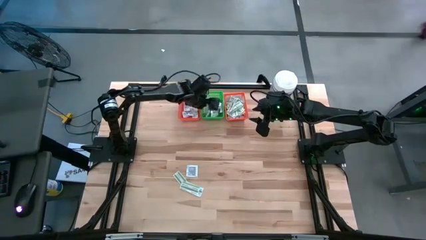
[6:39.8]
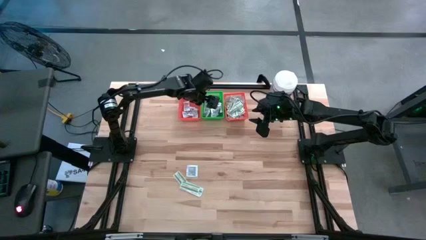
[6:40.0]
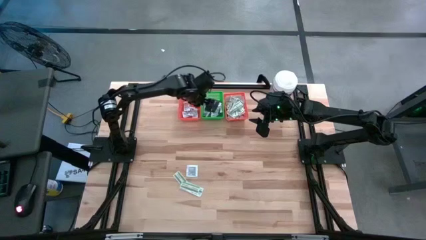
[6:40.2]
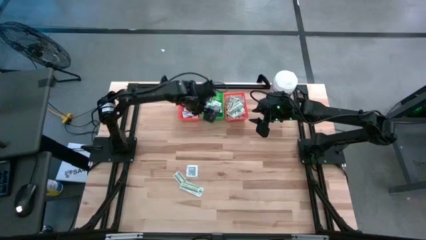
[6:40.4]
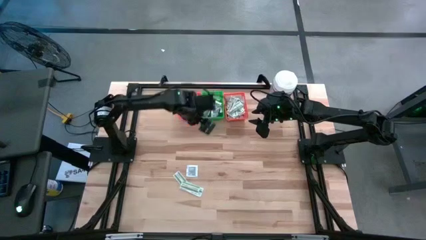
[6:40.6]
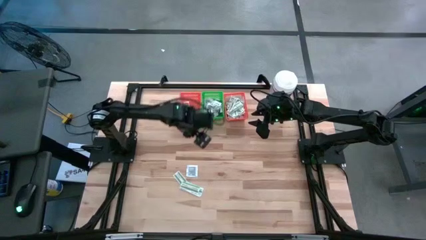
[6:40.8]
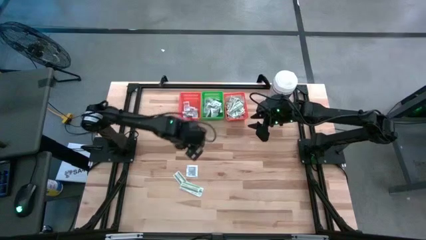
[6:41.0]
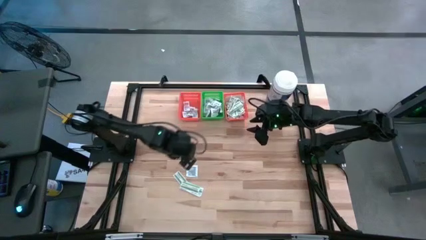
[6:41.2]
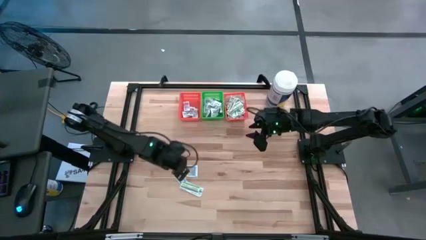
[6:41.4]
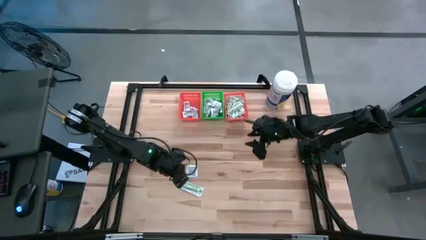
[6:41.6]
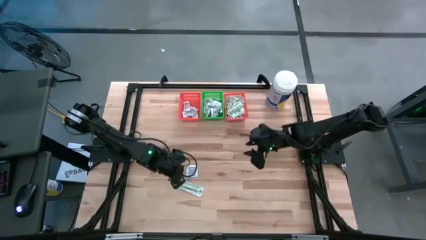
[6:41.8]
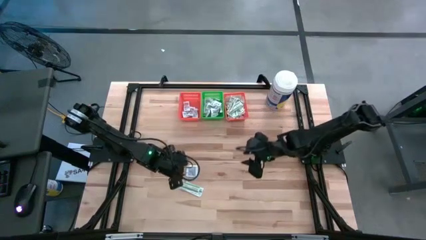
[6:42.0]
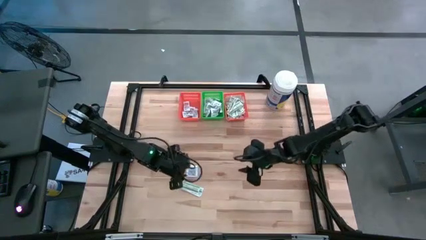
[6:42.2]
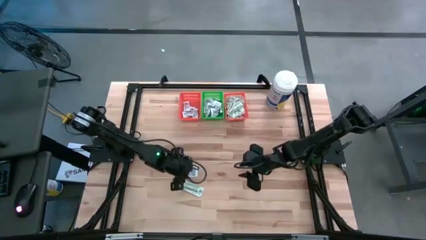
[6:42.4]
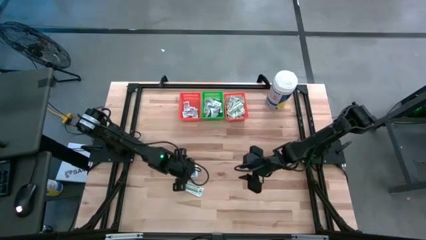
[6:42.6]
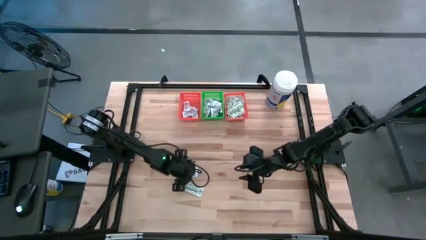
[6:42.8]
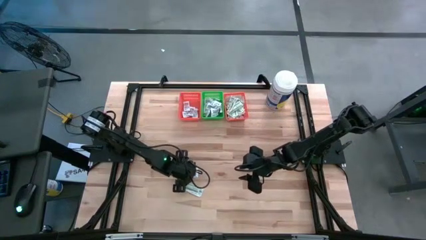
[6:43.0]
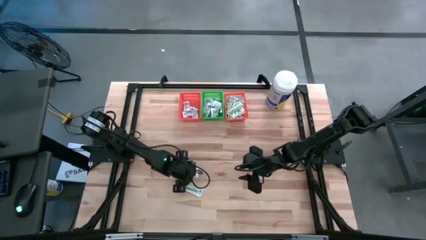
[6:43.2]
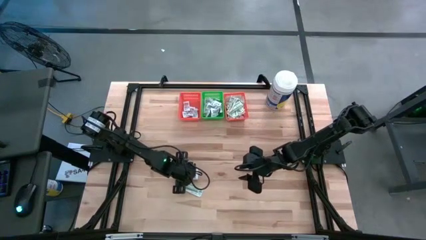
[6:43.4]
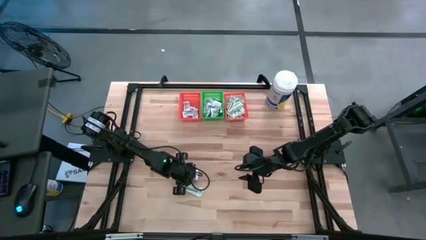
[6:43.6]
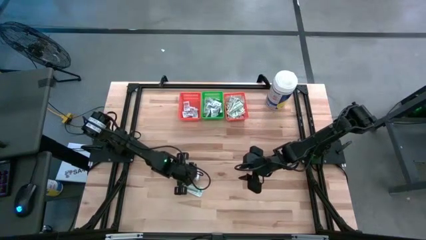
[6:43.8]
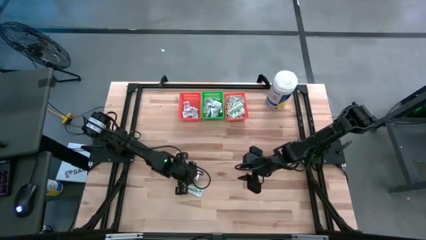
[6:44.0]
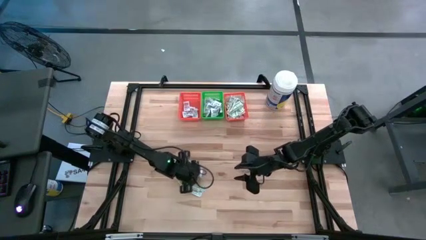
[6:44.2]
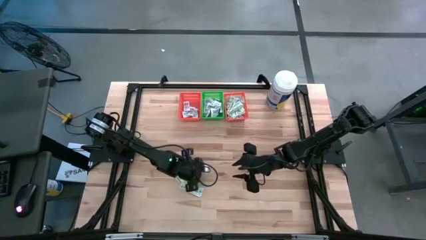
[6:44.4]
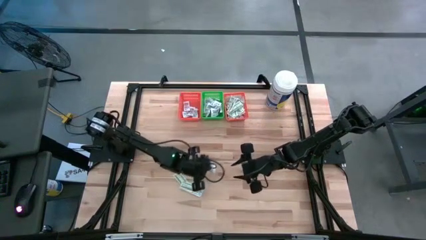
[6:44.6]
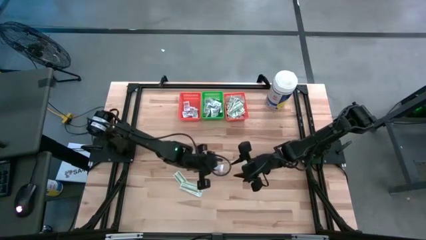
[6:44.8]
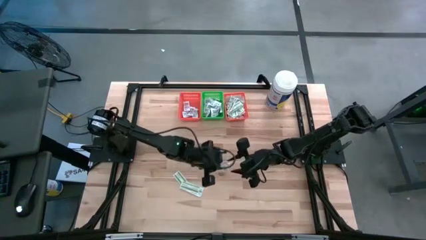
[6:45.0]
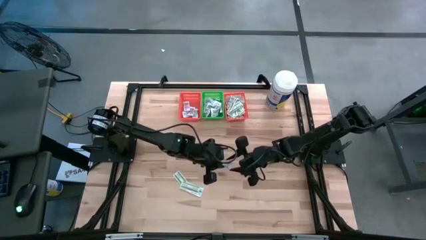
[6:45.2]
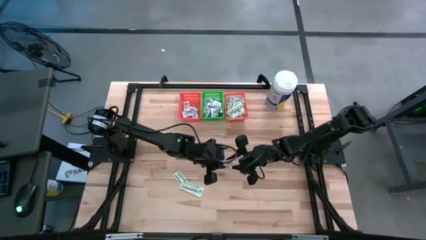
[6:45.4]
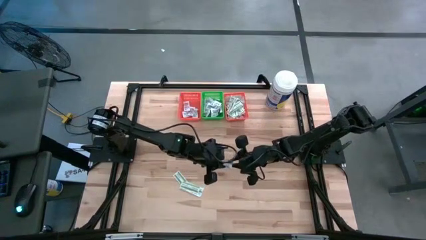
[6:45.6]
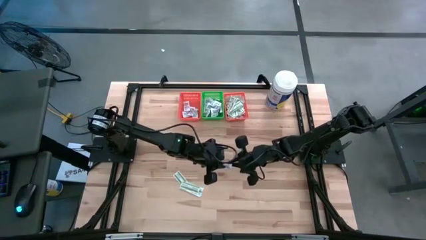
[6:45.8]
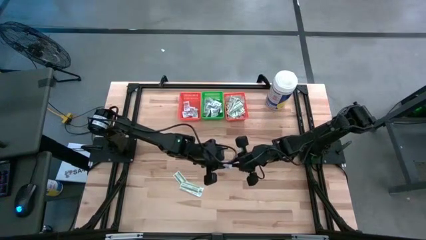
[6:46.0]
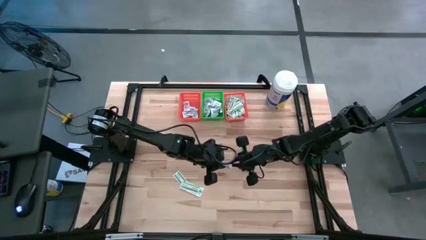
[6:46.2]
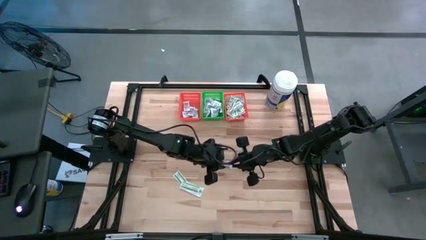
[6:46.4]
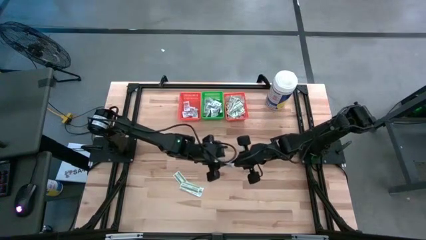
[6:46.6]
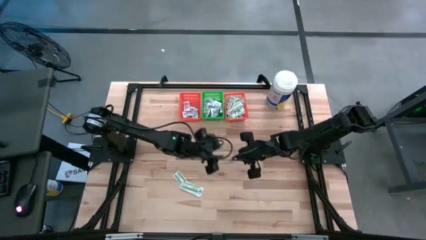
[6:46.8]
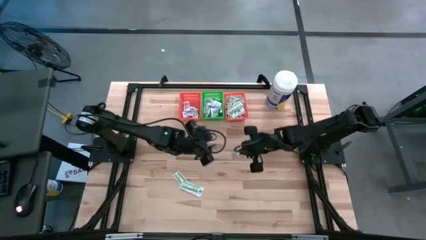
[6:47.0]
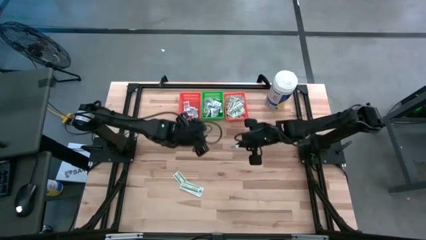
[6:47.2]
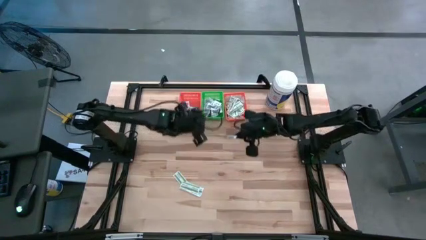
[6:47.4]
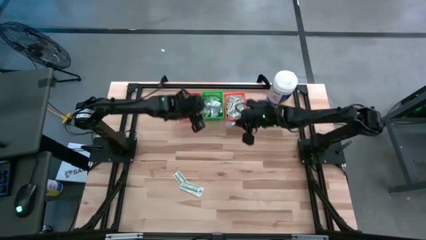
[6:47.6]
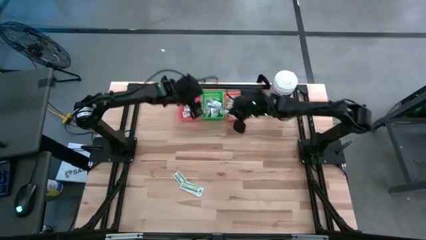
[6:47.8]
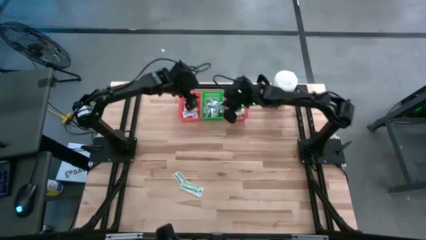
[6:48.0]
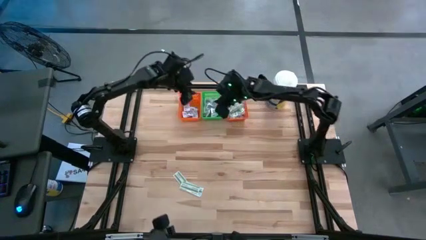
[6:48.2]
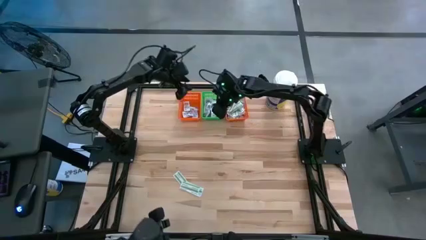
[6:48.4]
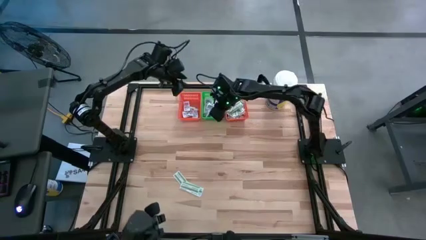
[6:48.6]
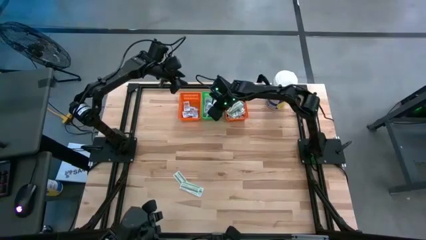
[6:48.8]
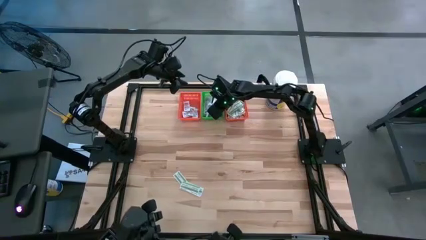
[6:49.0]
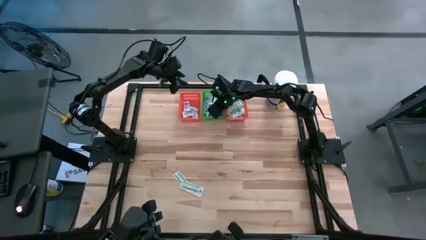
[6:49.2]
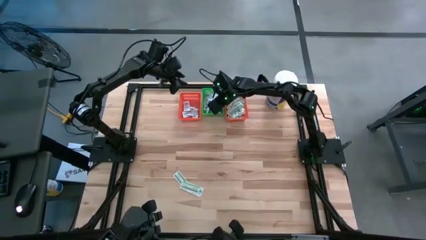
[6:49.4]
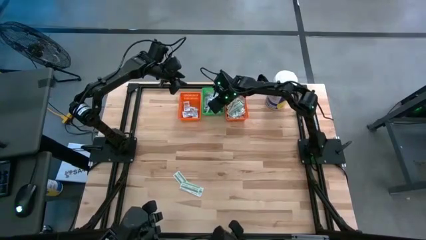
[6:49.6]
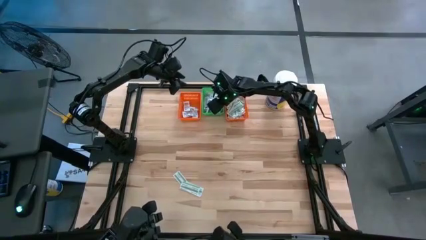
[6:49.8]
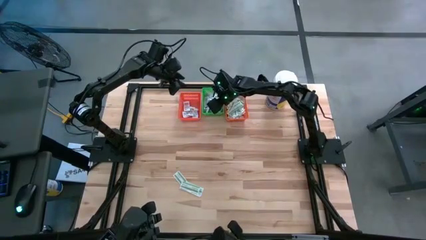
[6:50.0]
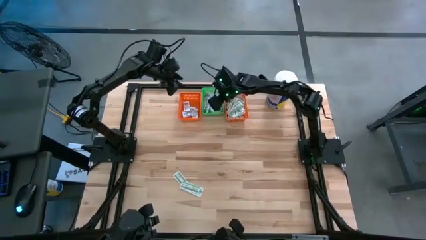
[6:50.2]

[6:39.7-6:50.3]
Task: Pick & Place First Aid Supplies
Put the towelette pack into the green bin
